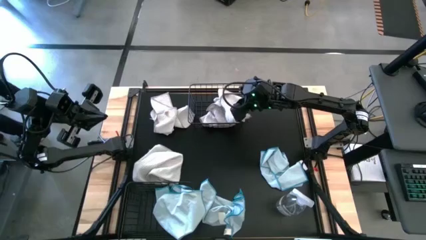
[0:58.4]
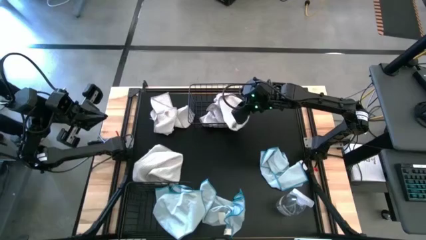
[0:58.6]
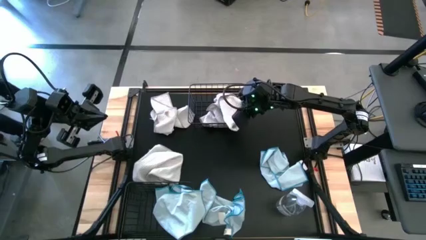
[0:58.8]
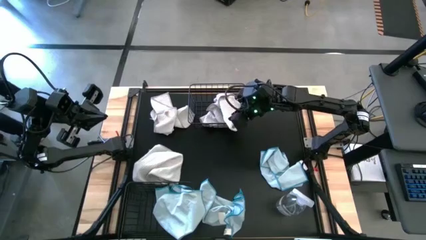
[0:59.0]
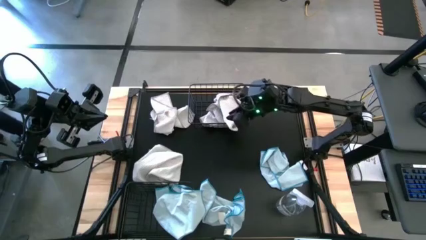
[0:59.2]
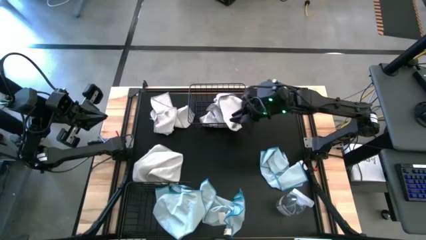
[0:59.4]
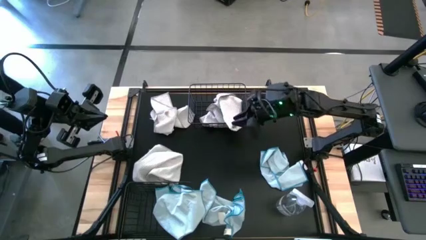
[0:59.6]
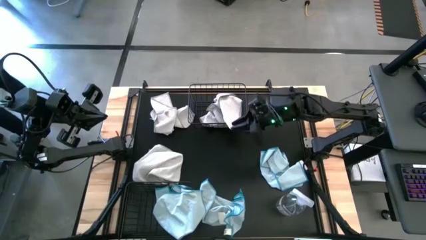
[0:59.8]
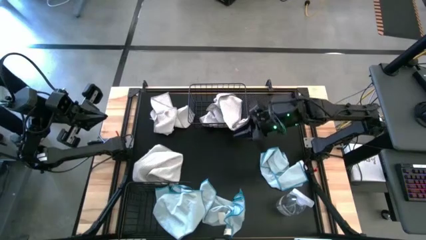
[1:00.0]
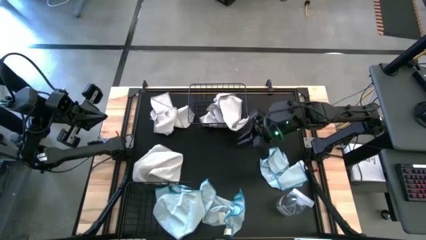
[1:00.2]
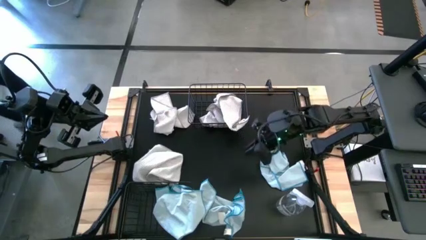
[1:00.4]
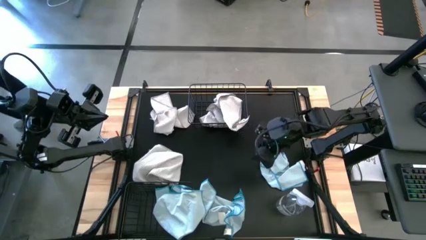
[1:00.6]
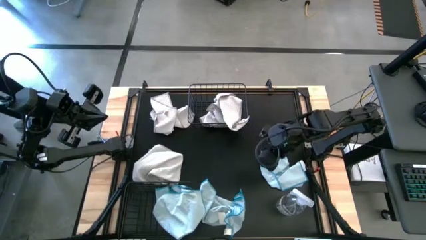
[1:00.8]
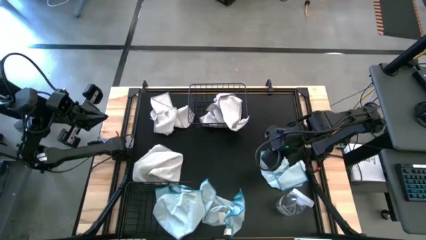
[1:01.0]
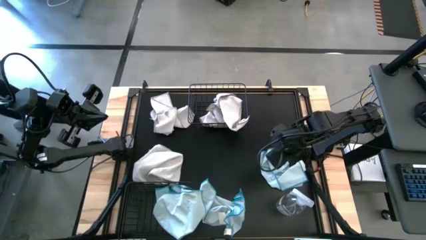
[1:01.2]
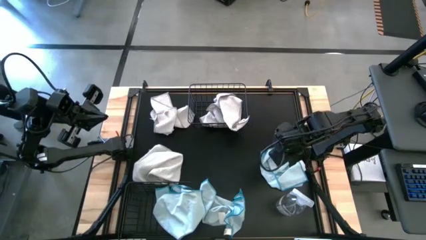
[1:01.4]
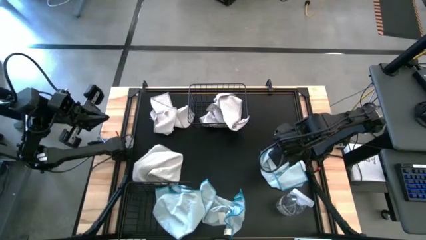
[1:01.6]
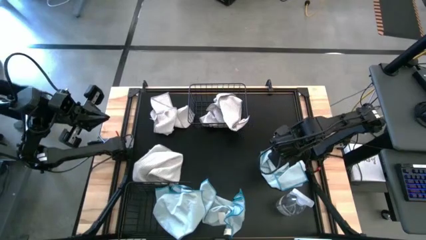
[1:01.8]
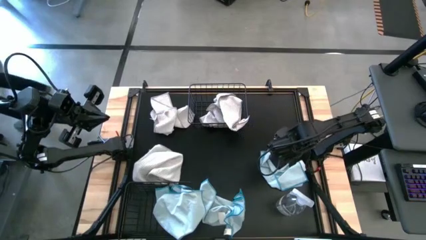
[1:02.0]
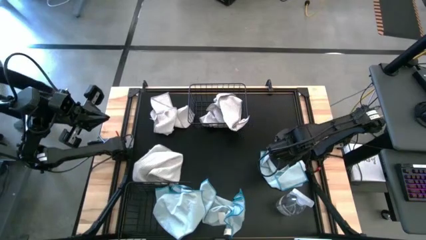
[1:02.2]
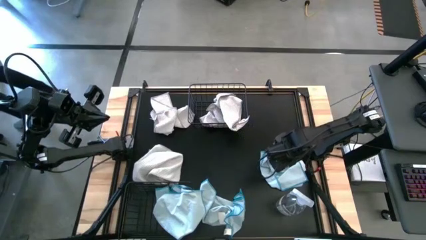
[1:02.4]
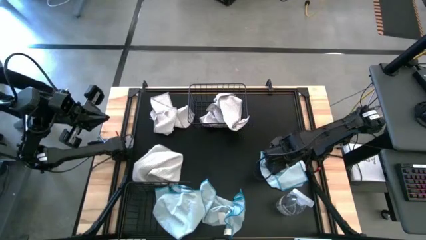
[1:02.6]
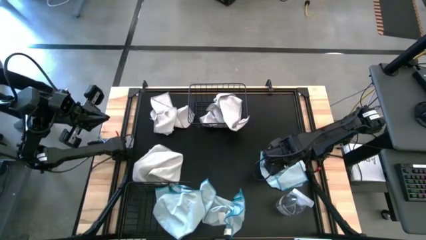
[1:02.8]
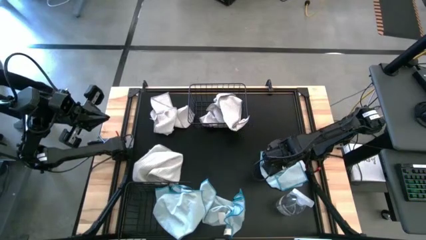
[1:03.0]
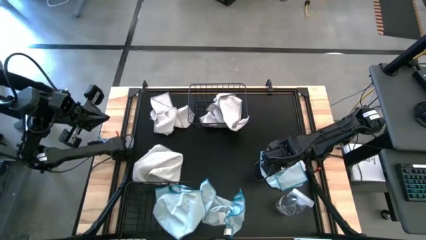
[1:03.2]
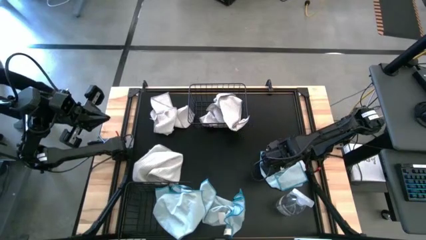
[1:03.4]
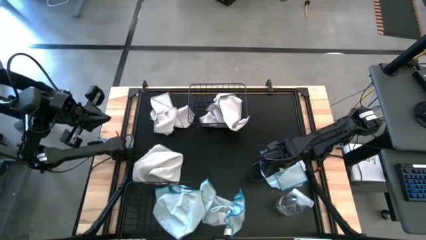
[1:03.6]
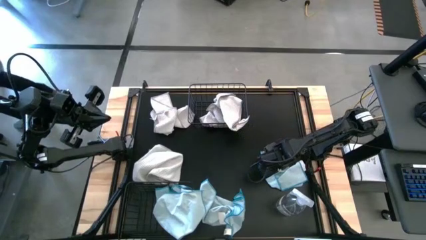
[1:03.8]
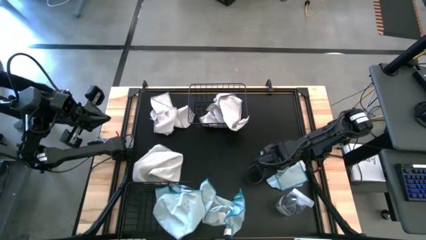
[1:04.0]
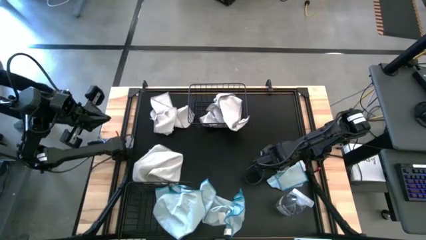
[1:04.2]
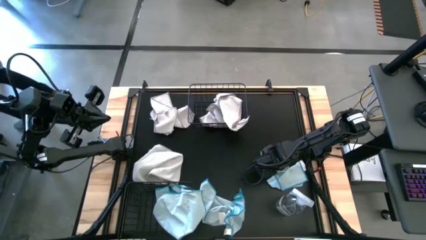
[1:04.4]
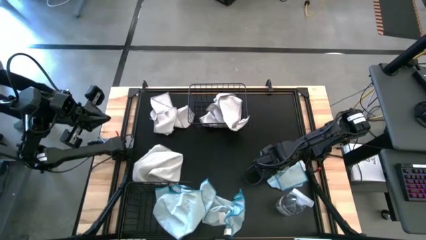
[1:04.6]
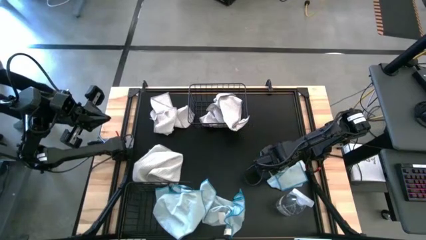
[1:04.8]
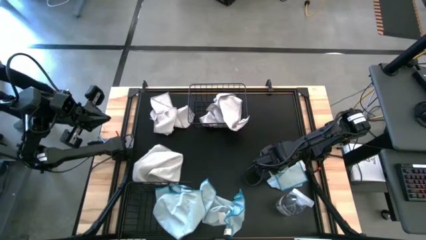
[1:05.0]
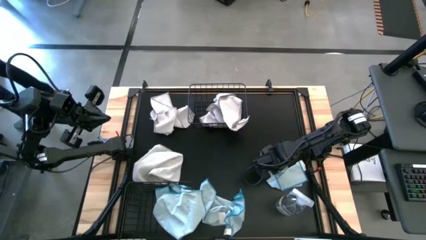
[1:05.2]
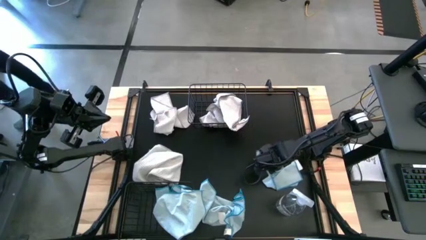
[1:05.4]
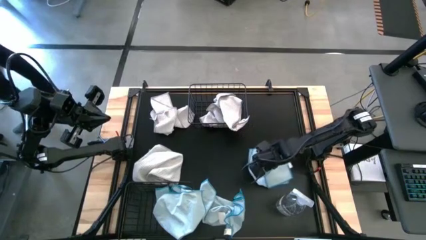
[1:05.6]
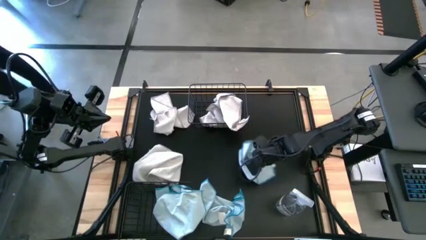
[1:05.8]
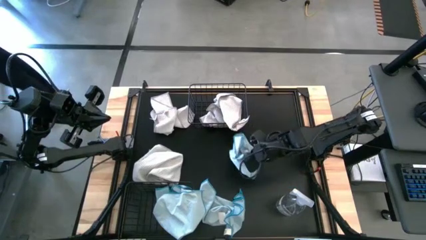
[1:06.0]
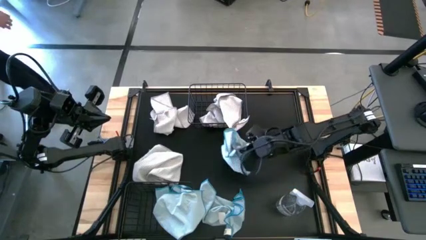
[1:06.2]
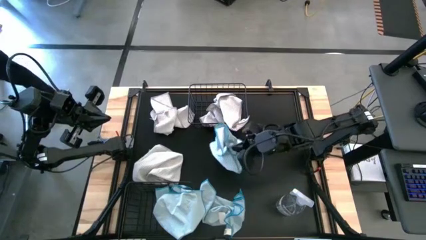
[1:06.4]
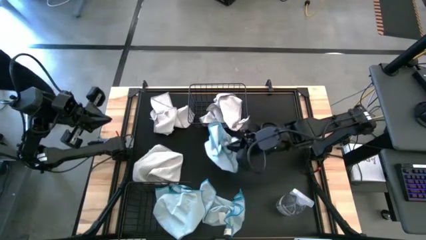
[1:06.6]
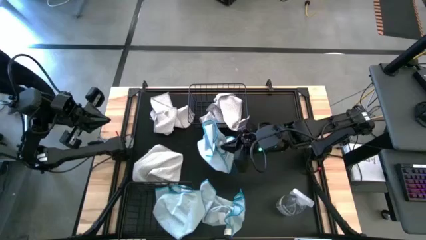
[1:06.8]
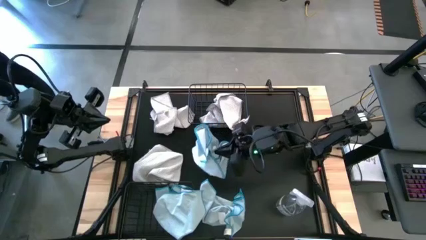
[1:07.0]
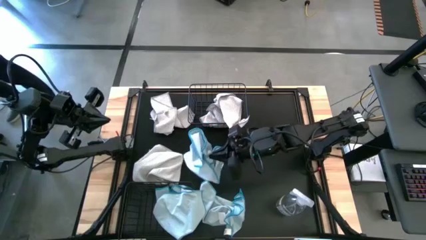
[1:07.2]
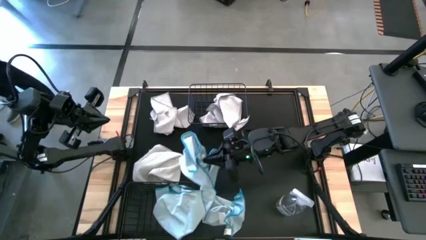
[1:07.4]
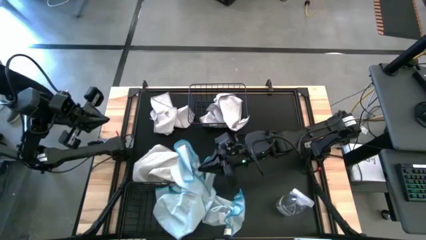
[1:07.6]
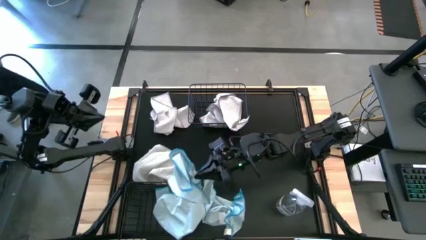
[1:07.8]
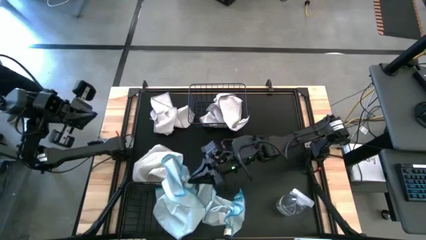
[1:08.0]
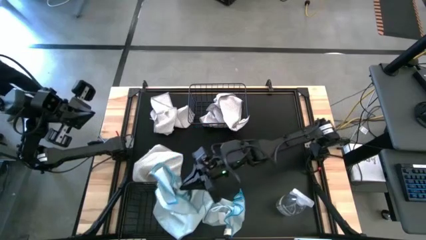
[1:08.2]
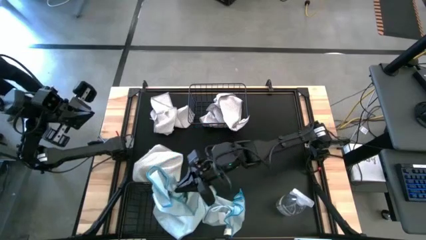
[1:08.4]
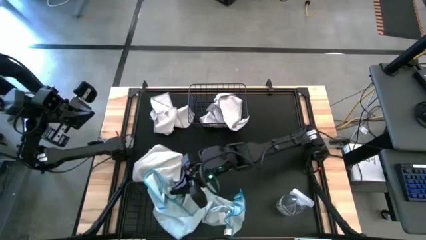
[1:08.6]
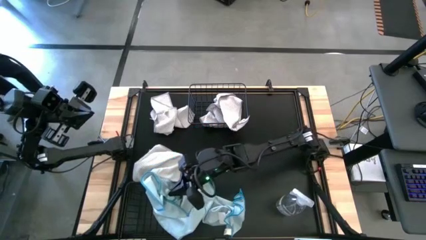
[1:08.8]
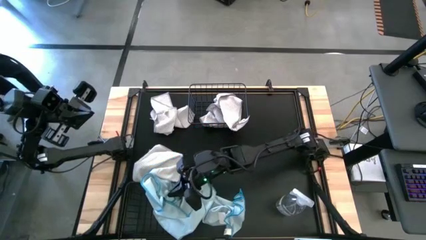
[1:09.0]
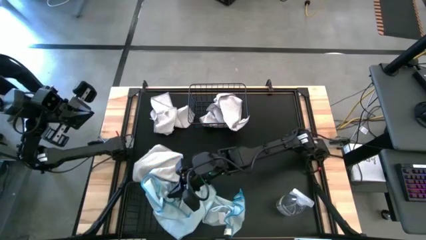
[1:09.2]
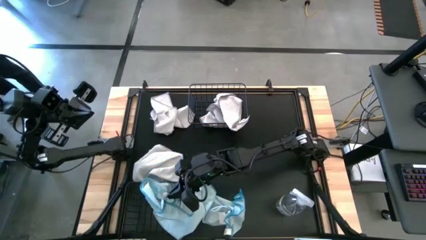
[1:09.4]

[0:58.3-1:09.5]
Task: Sort microfiber towel by color & place in baskets
Put the right blue microfiber cloth into the bottom wire basket
